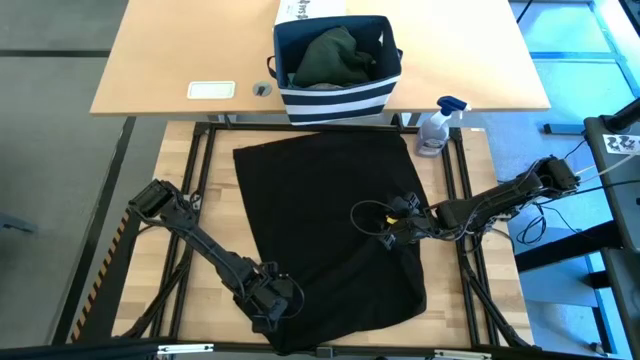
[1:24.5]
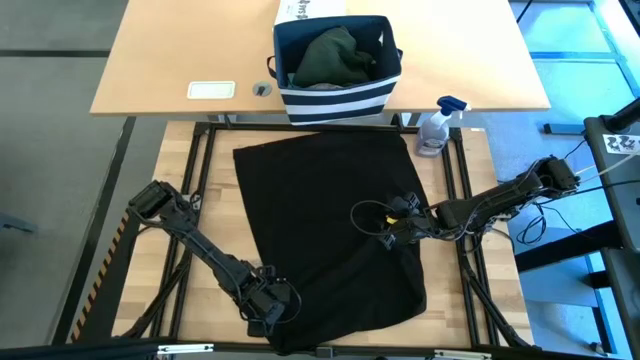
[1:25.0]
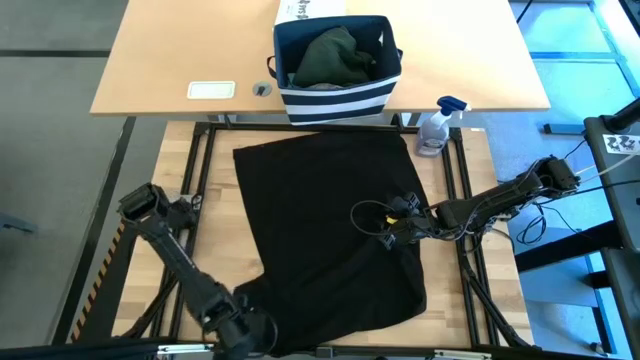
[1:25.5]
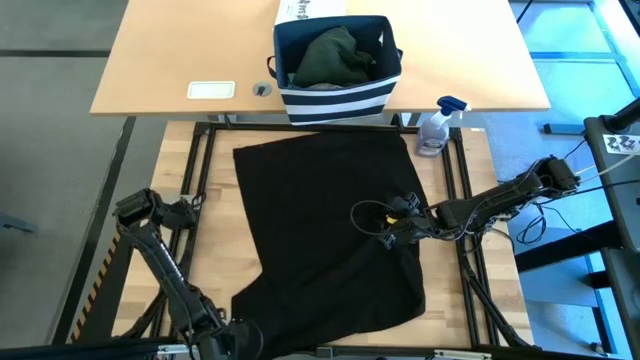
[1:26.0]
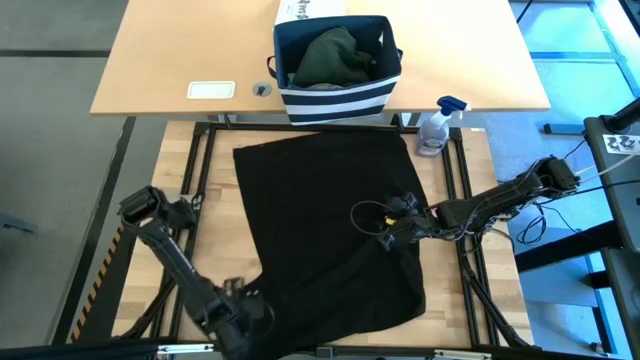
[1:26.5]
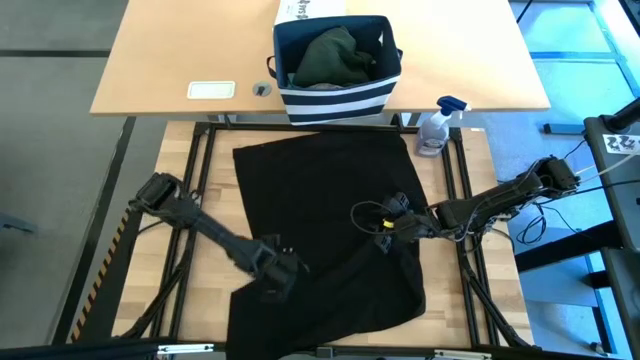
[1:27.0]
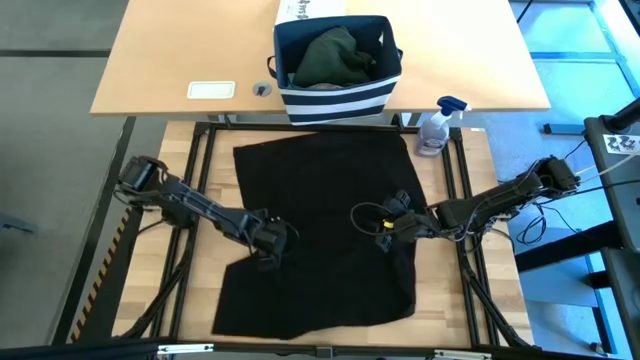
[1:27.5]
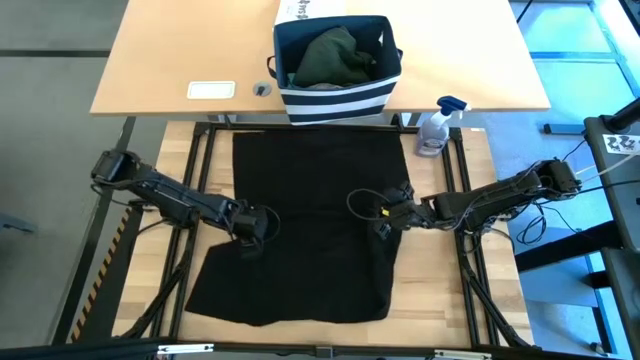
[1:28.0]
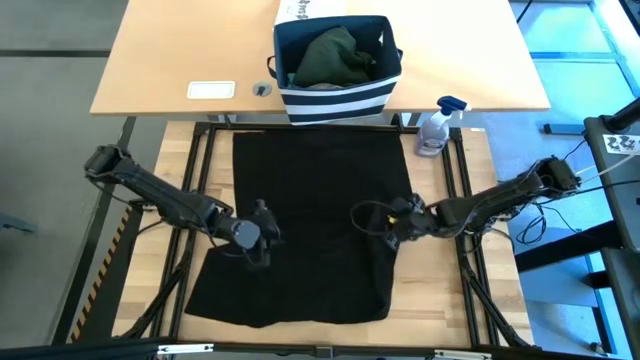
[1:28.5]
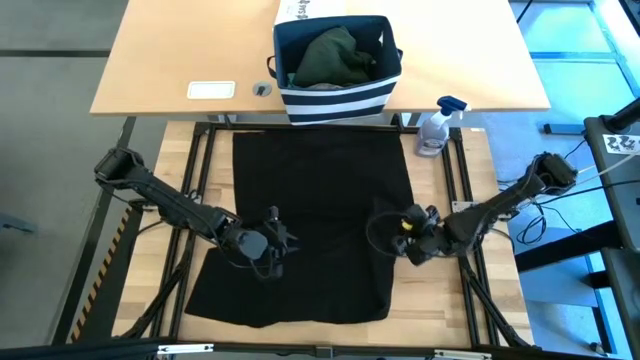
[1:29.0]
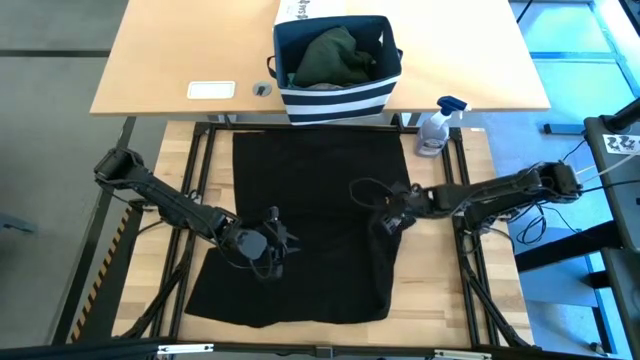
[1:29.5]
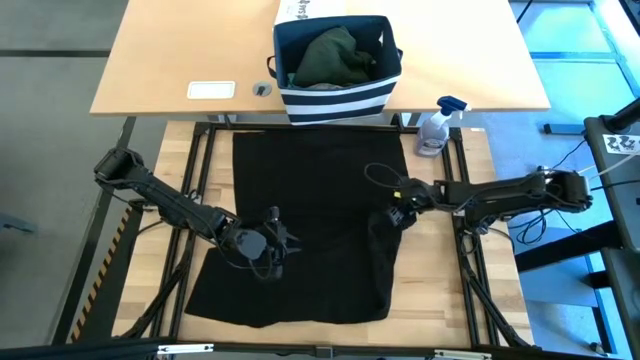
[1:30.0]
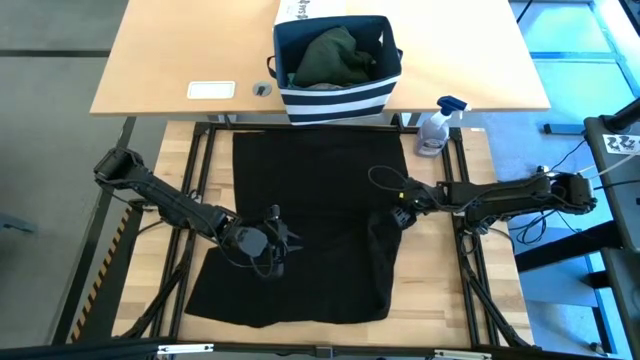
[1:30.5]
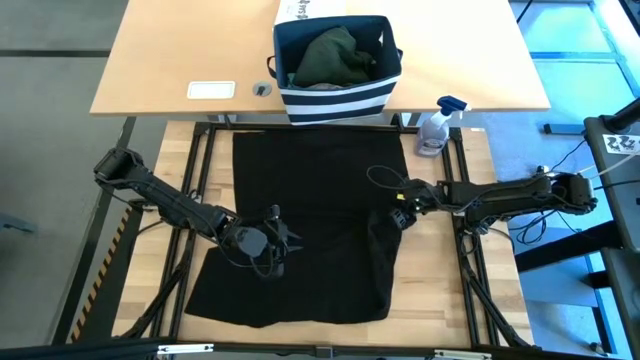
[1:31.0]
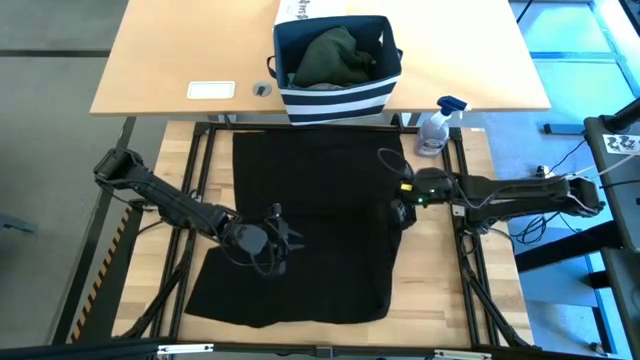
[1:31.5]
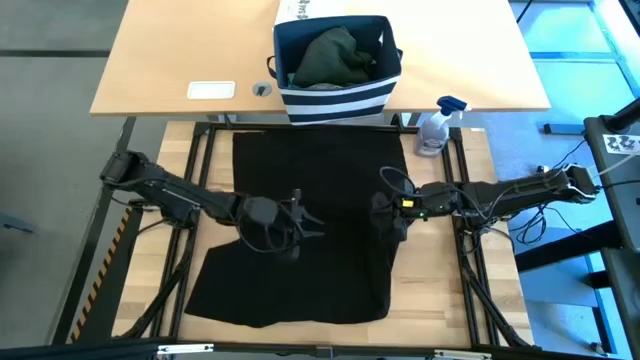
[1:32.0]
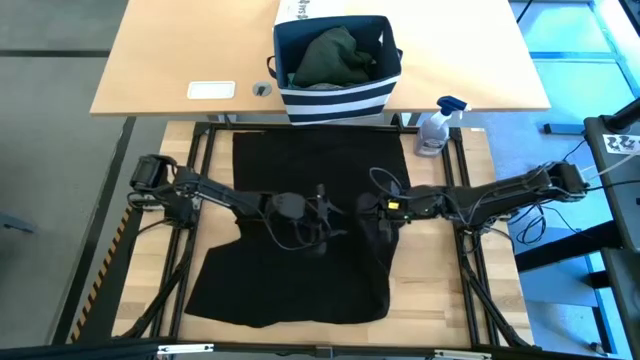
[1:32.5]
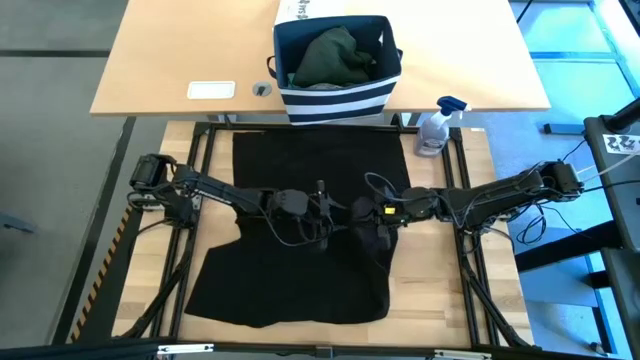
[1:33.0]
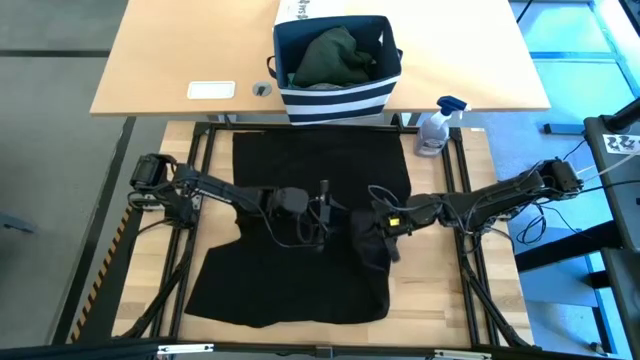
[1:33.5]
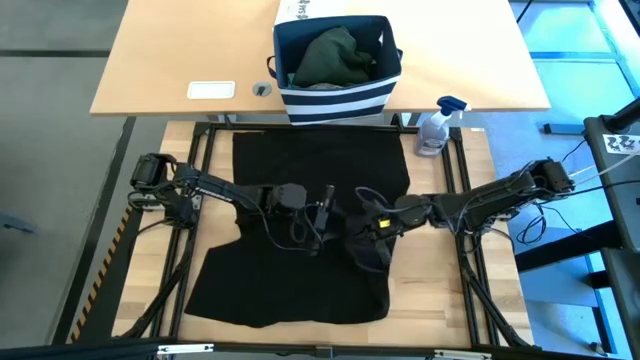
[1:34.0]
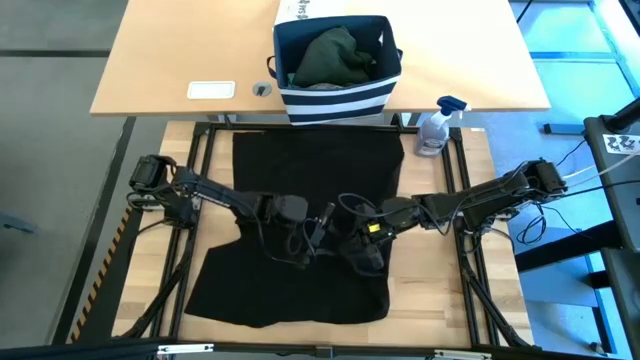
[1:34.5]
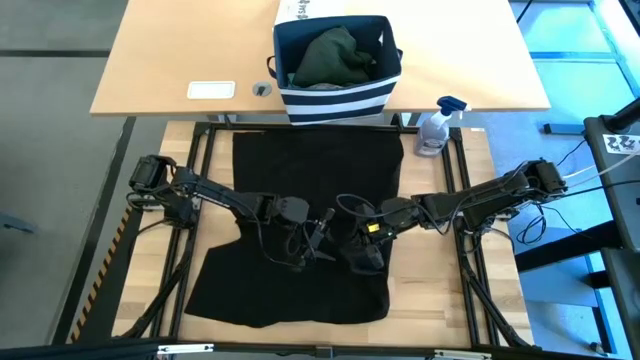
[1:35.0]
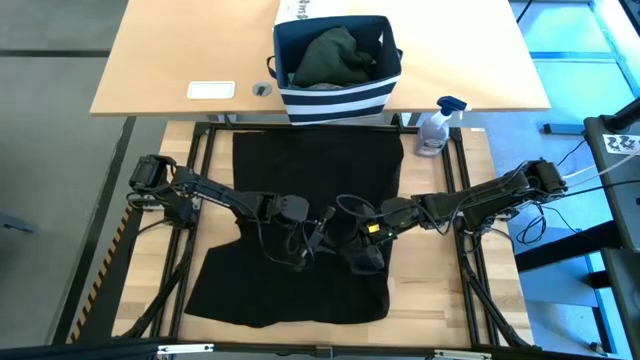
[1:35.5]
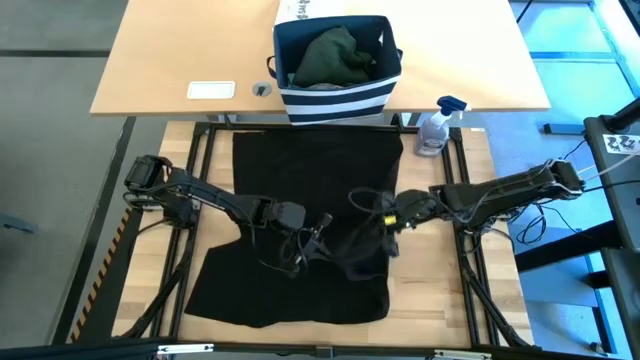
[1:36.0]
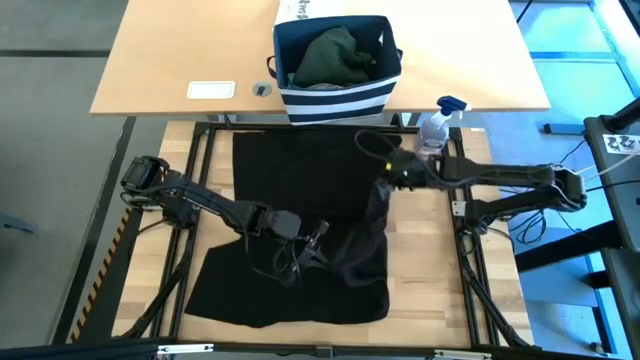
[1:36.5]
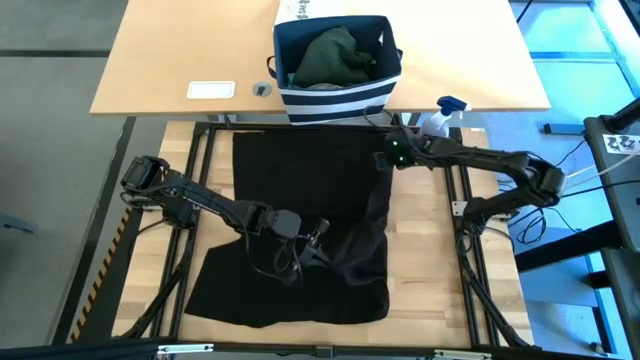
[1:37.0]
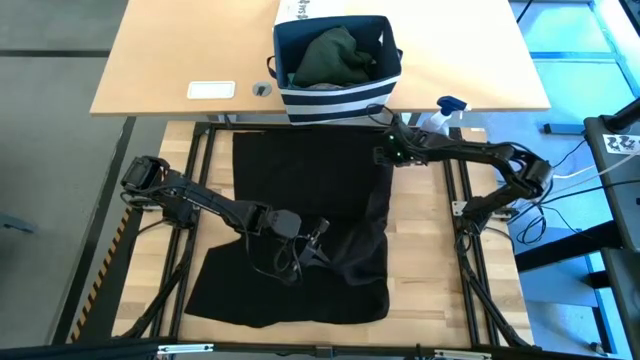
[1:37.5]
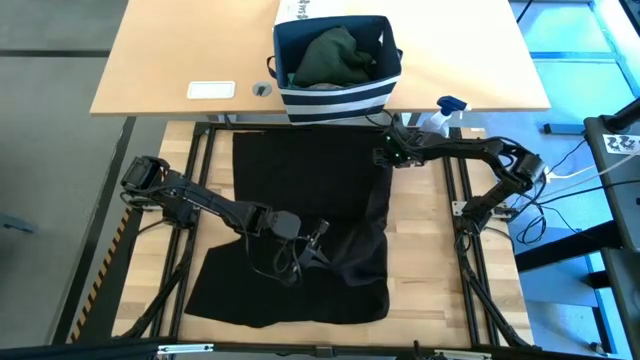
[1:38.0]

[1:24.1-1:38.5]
Task: Fold Laundry from Bin
Fold the black shirt

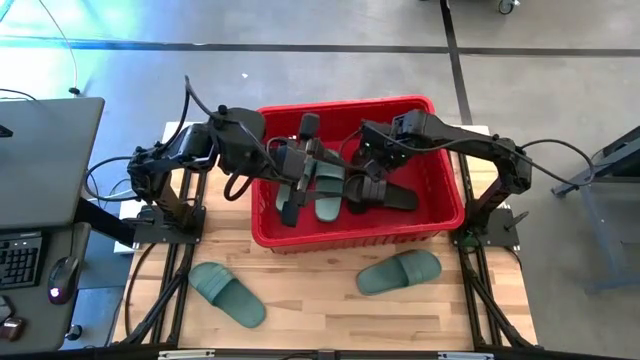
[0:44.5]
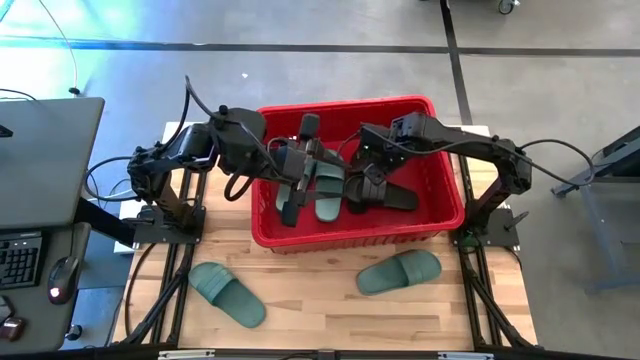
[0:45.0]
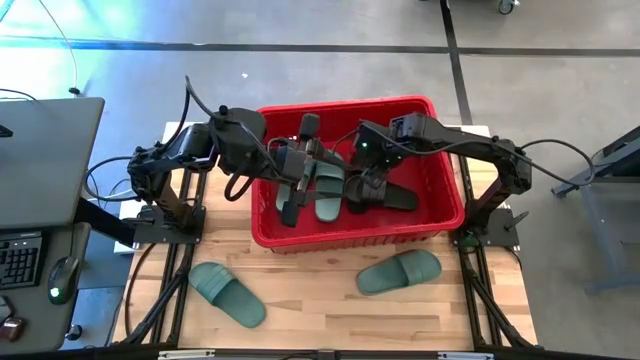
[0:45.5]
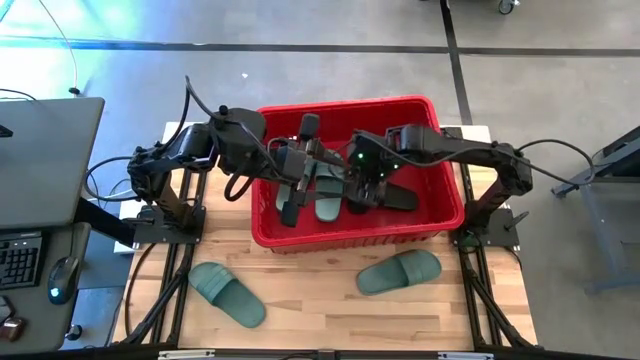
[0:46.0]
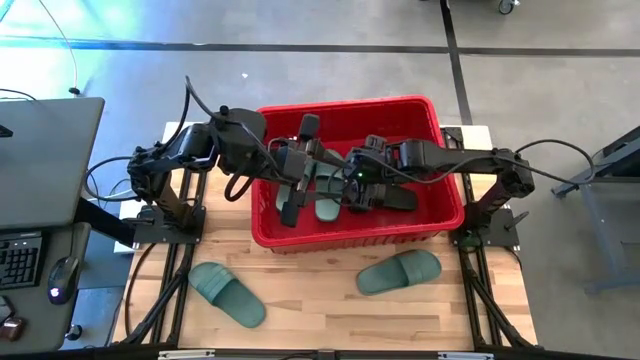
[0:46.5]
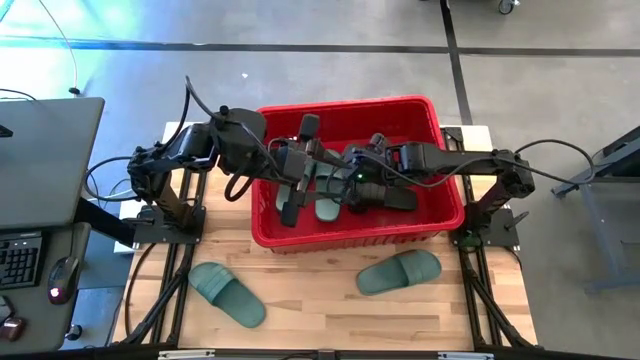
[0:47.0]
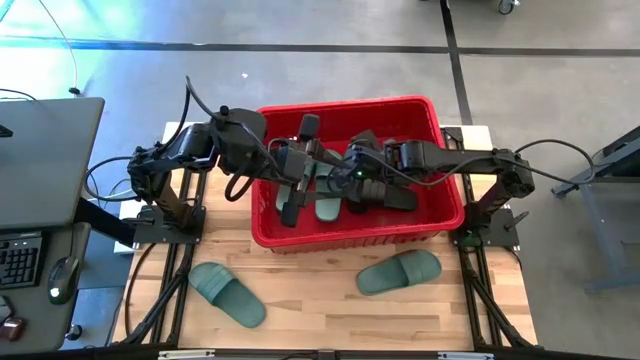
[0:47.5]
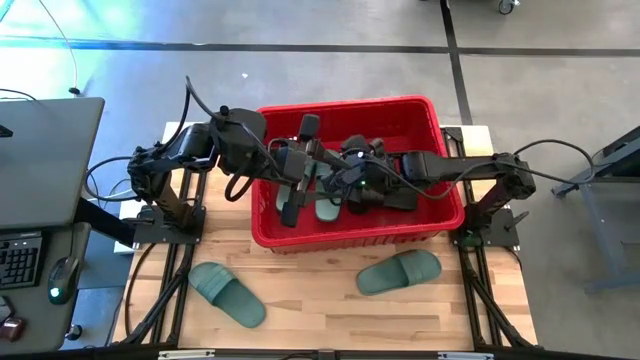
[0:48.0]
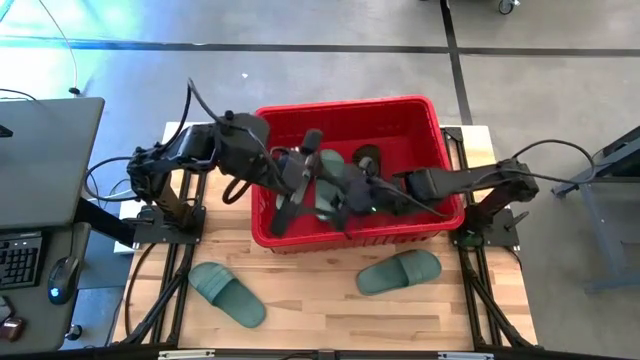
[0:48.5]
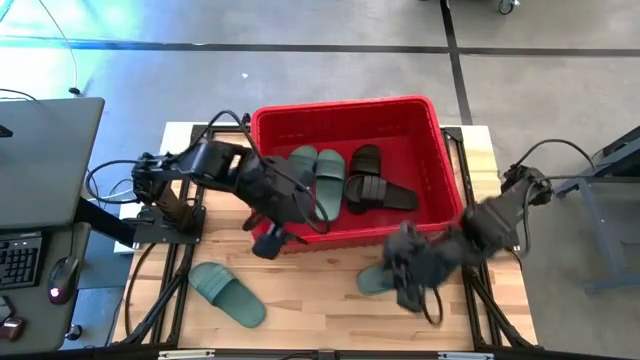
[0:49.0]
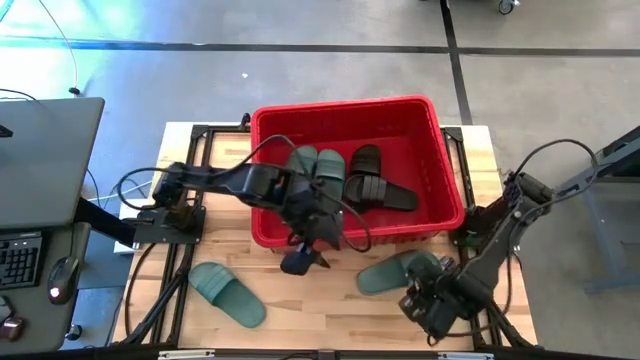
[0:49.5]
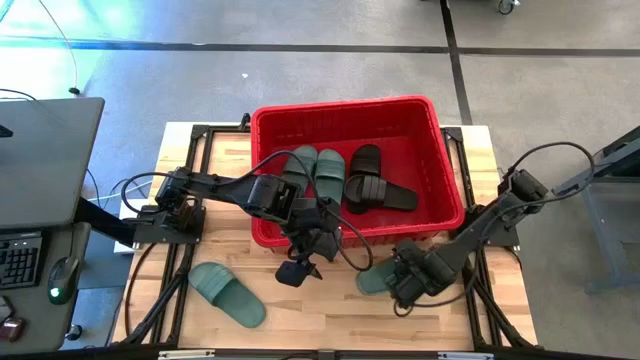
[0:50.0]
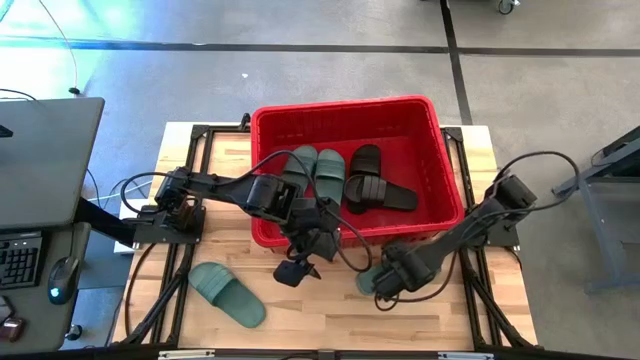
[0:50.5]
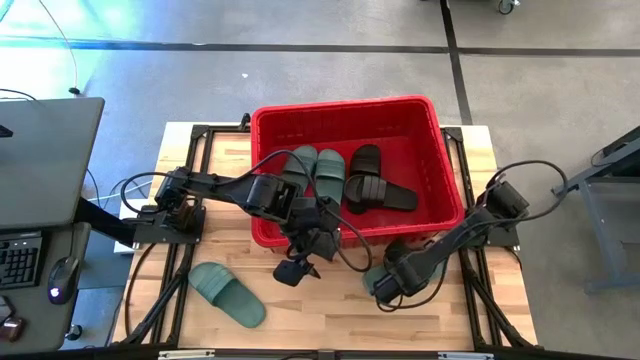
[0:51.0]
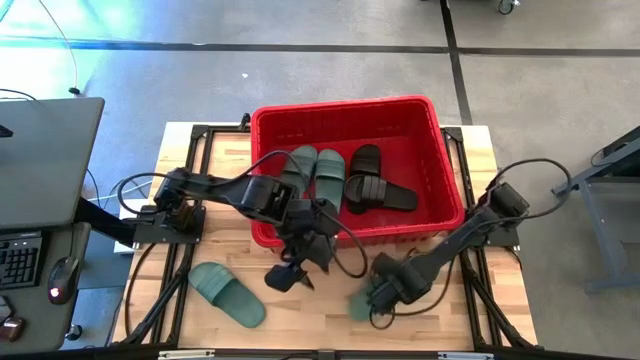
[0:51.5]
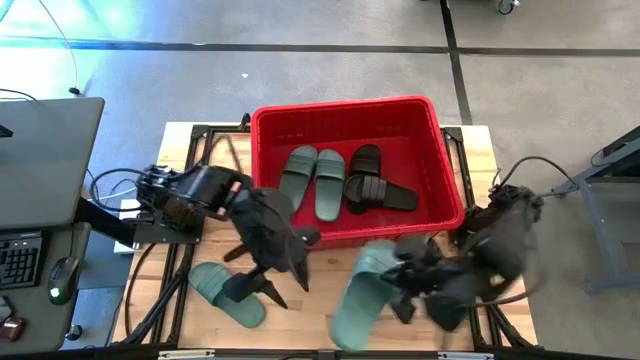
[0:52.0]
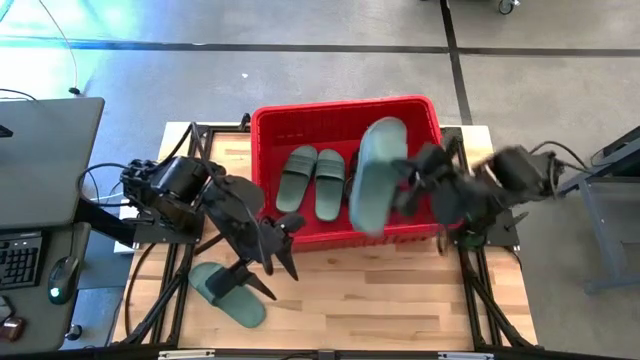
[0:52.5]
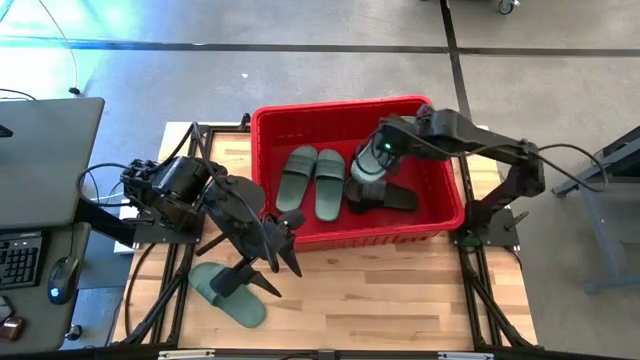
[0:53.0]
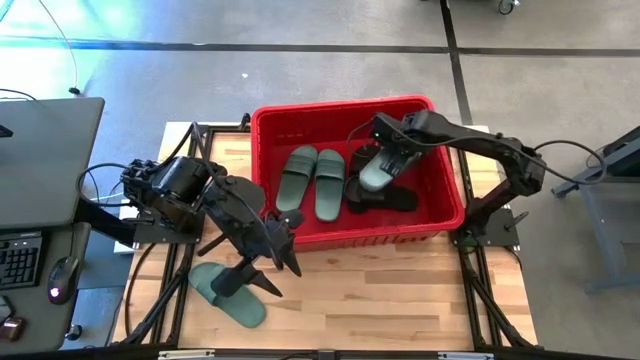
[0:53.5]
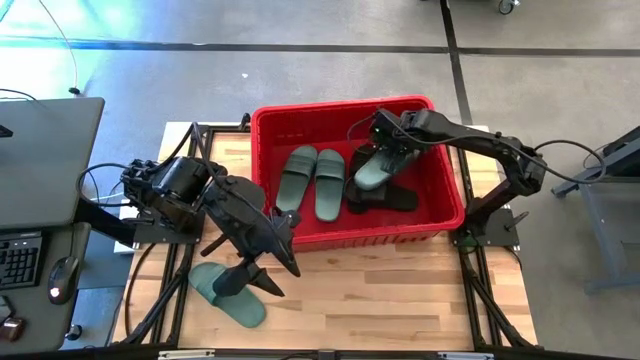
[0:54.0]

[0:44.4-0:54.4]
Task: Pick and place slides into bin
Put the green slipper into the red bin
